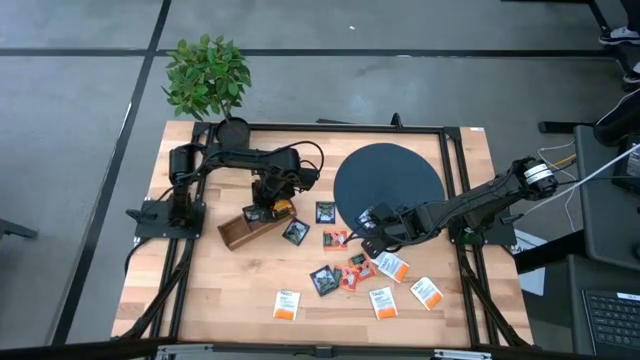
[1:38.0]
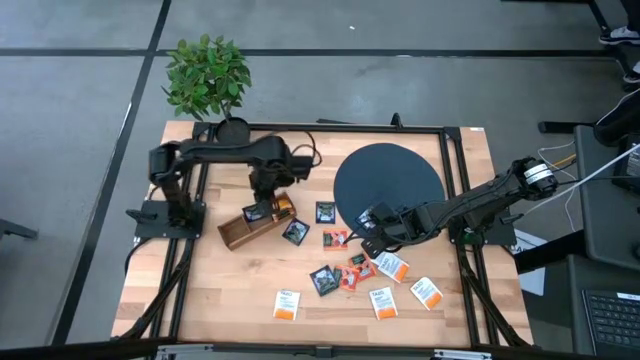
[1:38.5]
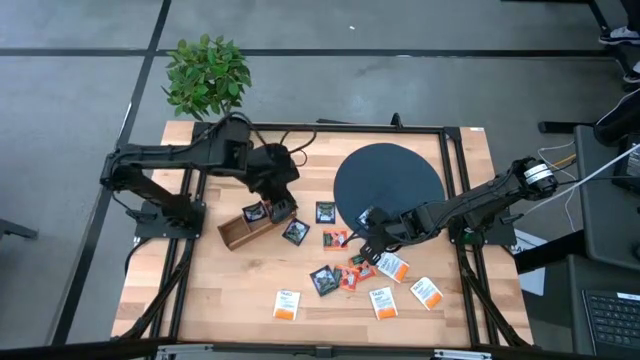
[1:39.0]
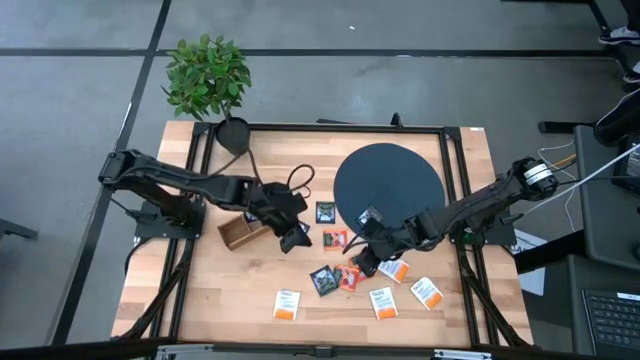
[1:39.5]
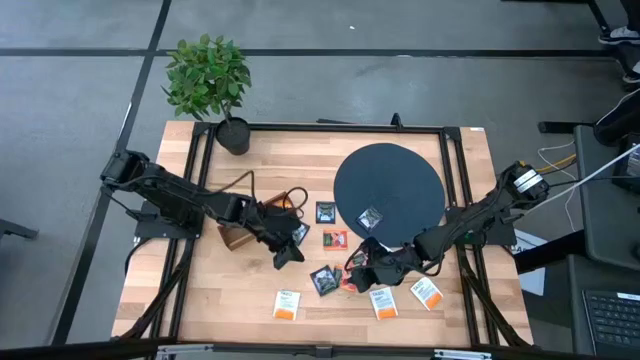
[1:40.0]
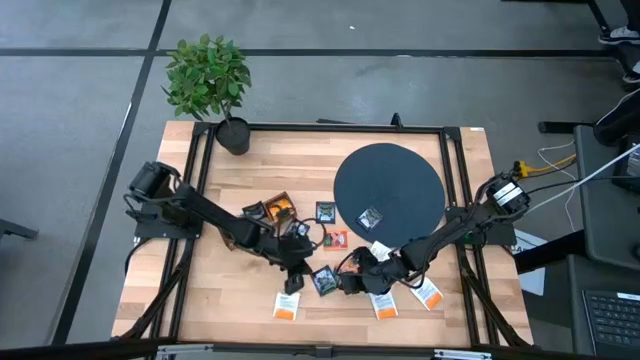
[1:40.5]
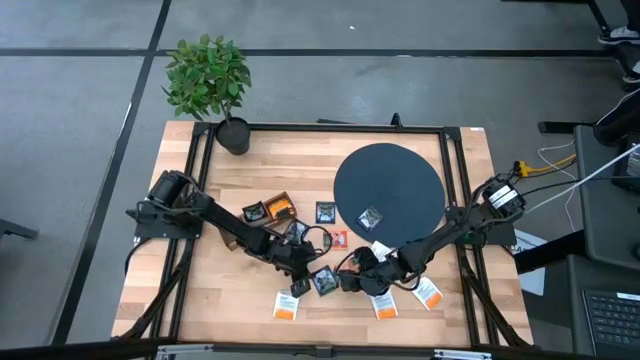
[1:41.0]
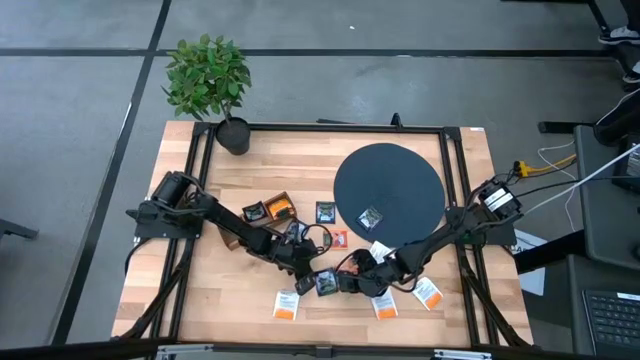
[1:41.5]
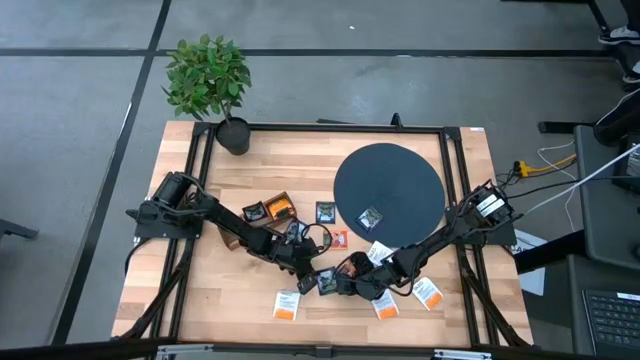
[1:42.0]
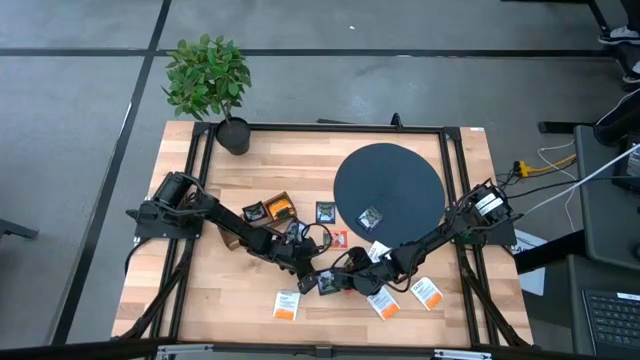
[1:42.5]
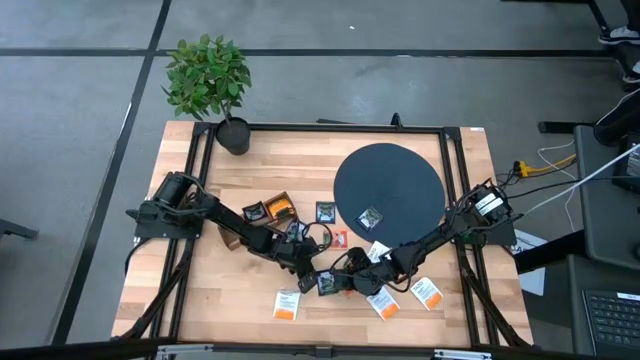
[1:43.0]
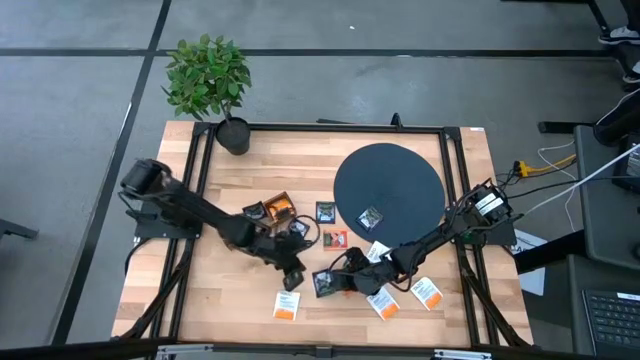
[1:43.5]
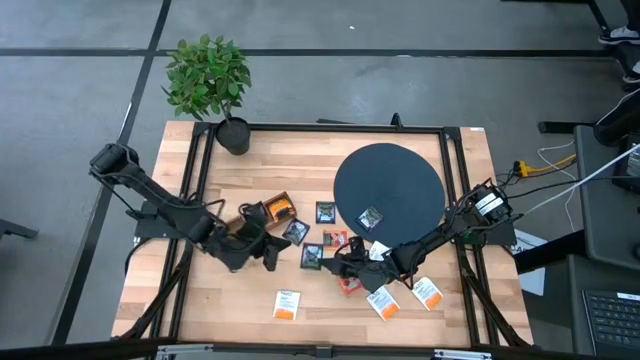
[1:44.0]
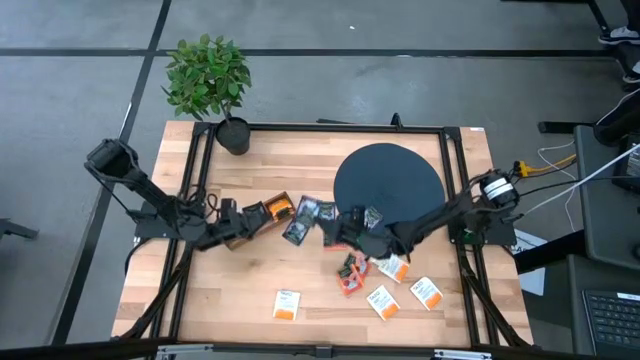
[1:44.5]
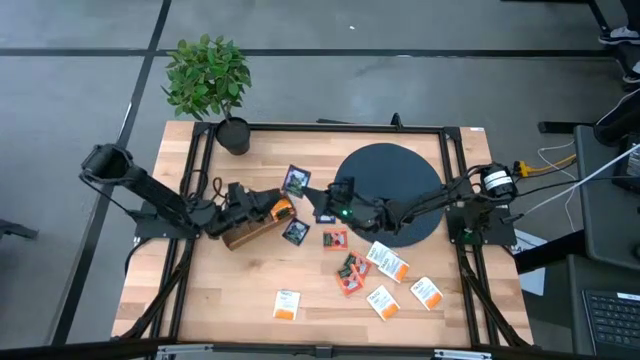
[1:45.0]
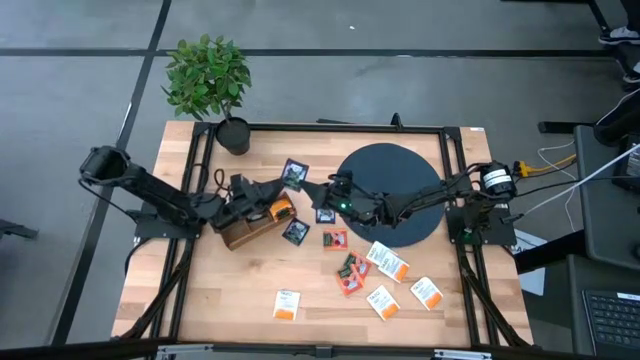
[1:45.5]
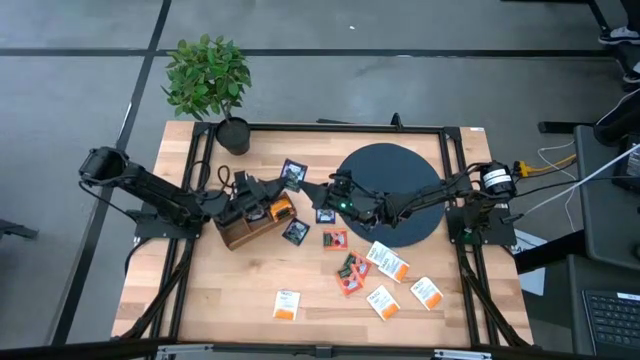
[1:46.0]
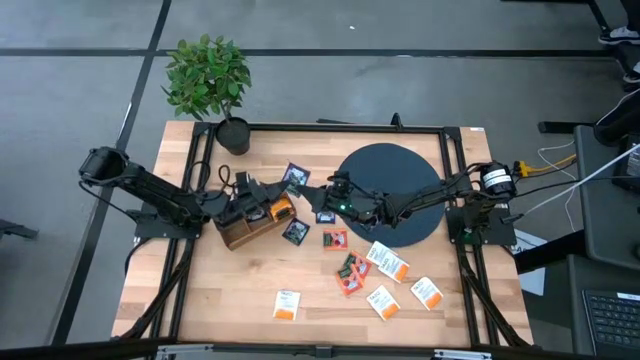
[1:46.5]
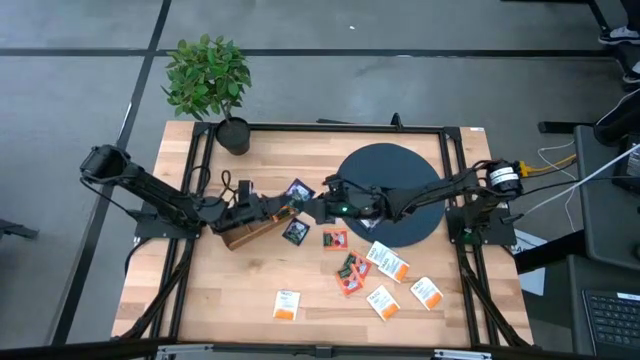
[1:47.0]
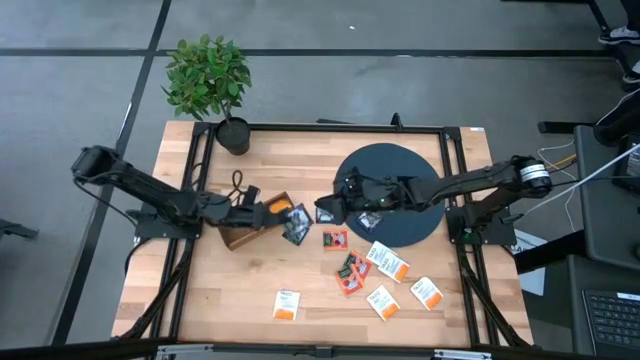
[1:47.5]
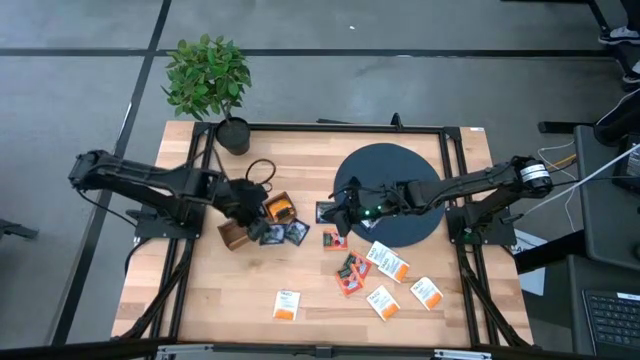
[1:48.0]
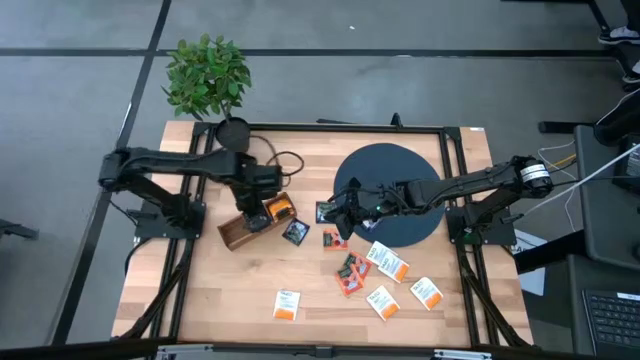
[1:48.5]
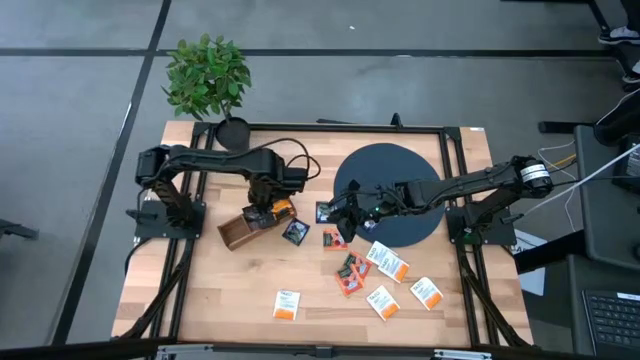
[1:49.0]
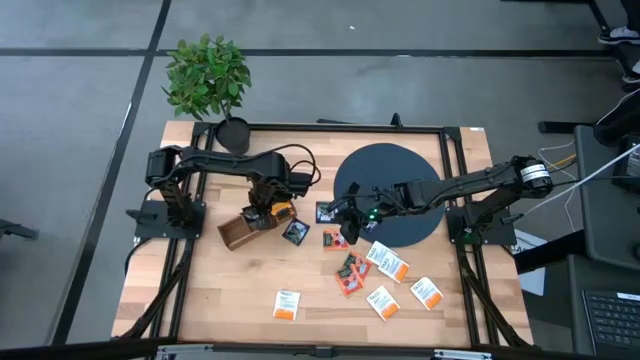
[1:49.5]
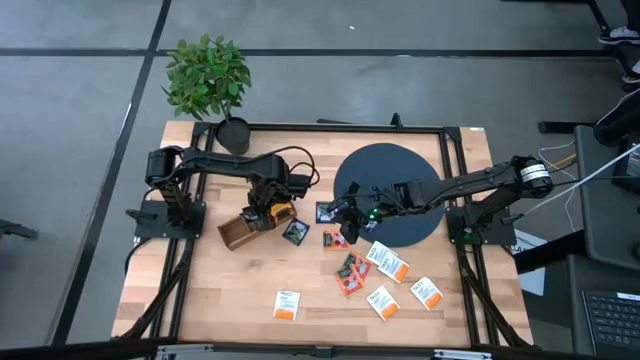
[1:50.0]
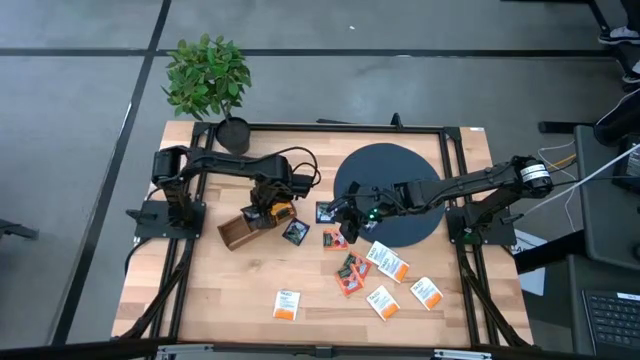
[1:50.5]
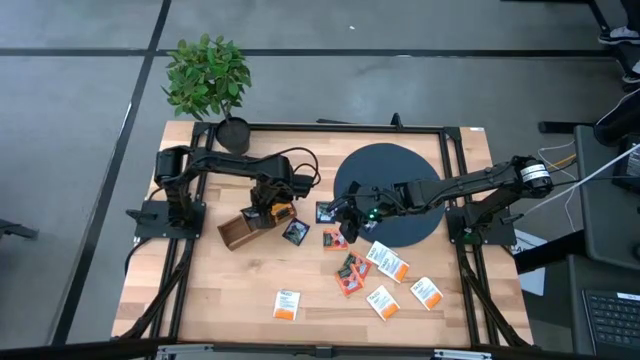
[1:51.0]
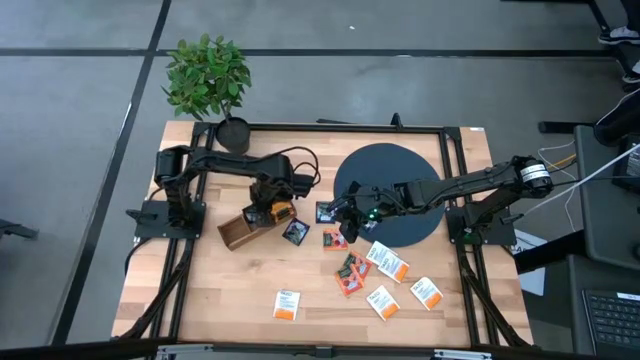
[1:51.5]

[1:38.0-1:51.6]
Task: Pick & Place Tea
Put the black tea bag into the middle section of the wooden organizer

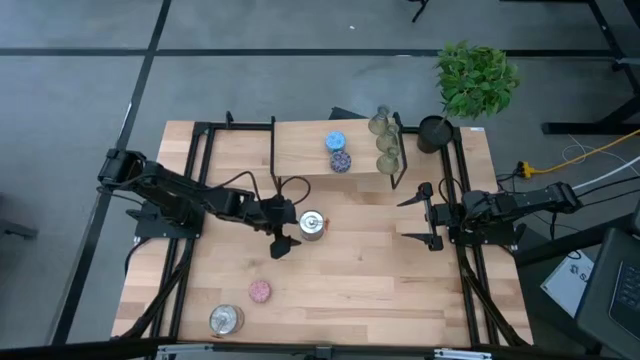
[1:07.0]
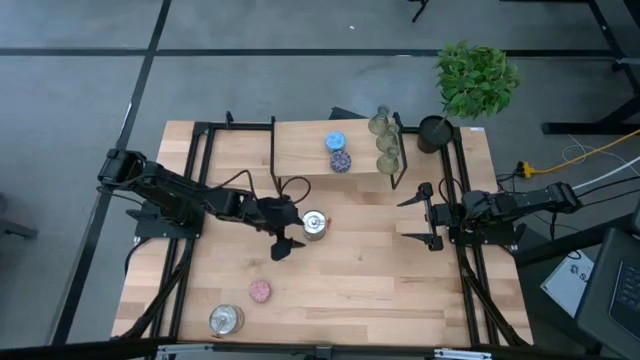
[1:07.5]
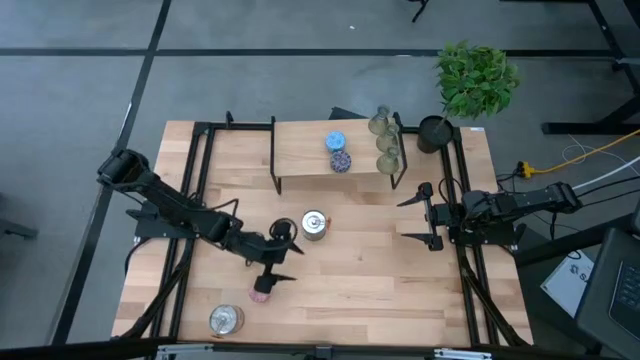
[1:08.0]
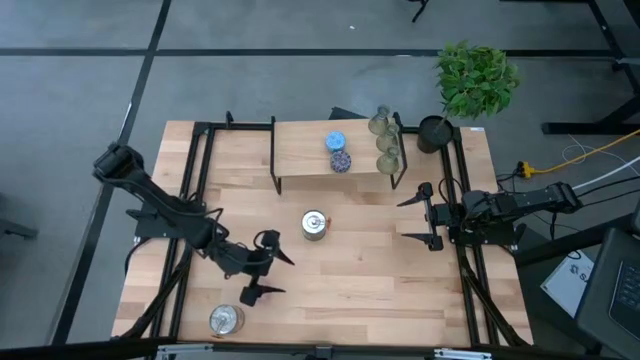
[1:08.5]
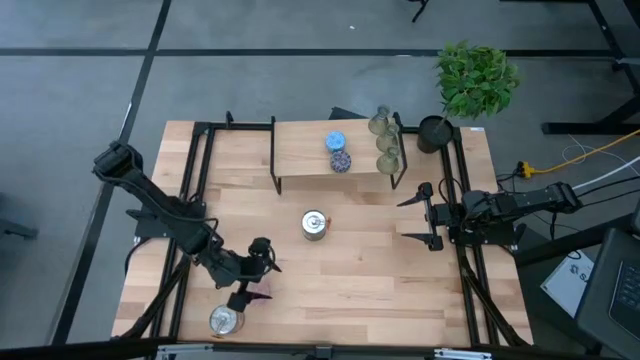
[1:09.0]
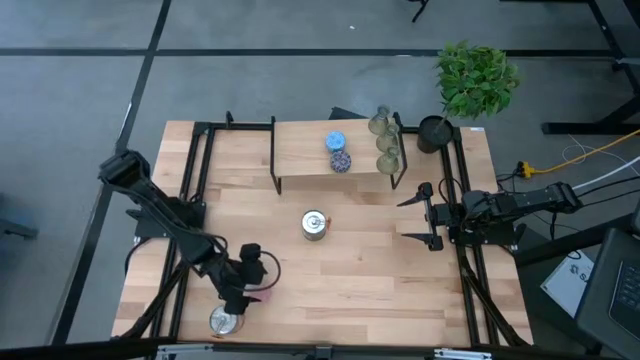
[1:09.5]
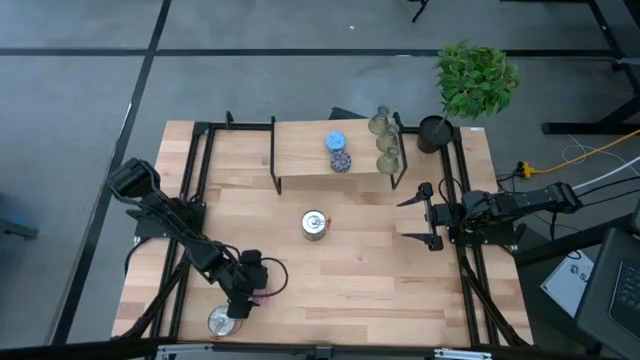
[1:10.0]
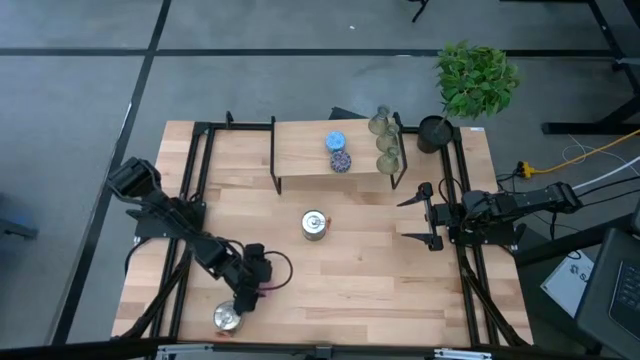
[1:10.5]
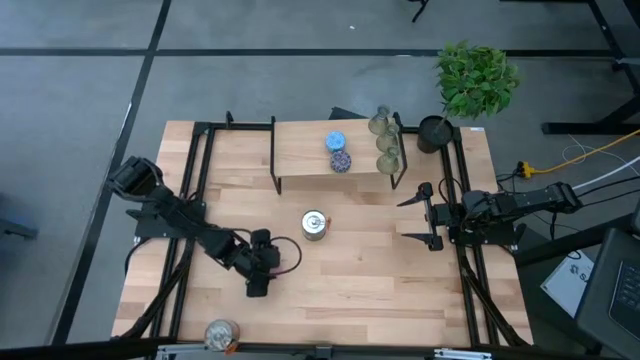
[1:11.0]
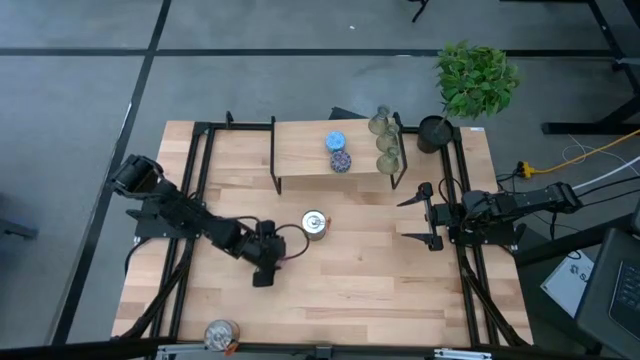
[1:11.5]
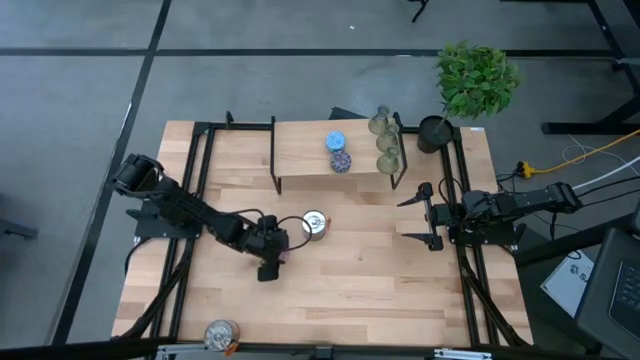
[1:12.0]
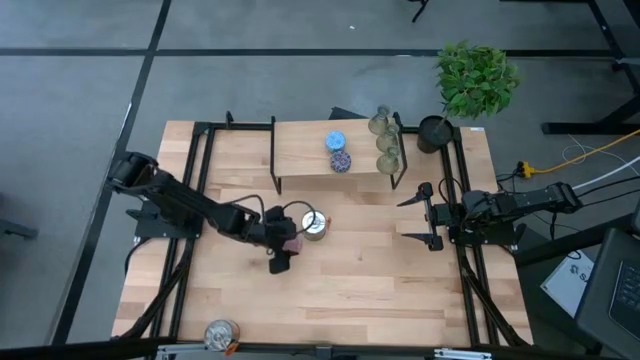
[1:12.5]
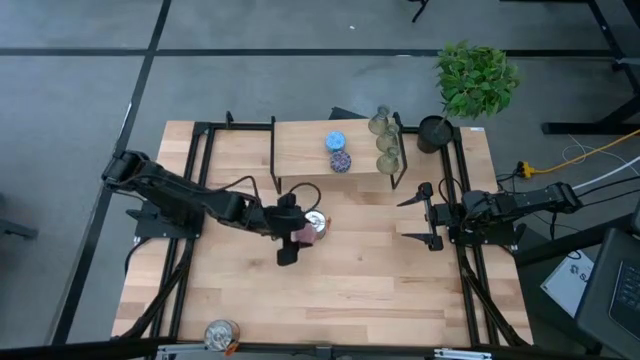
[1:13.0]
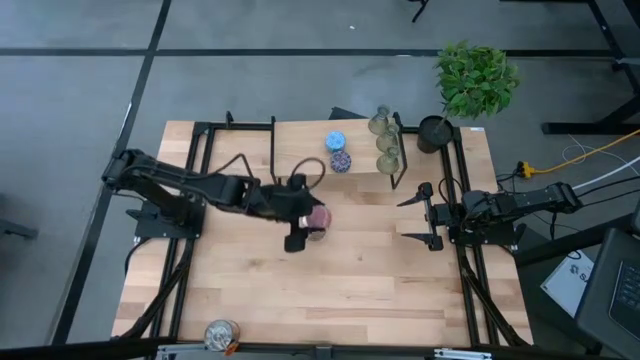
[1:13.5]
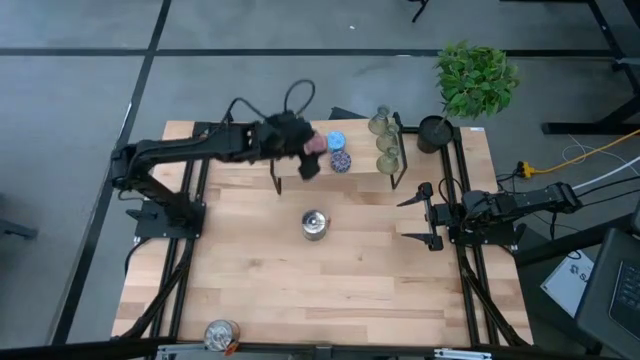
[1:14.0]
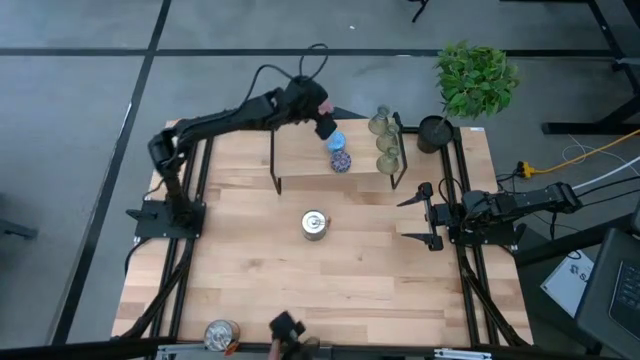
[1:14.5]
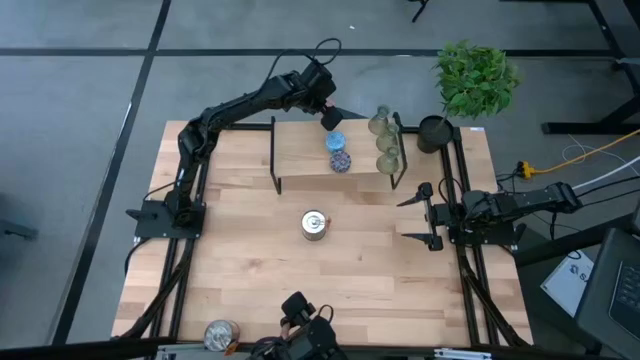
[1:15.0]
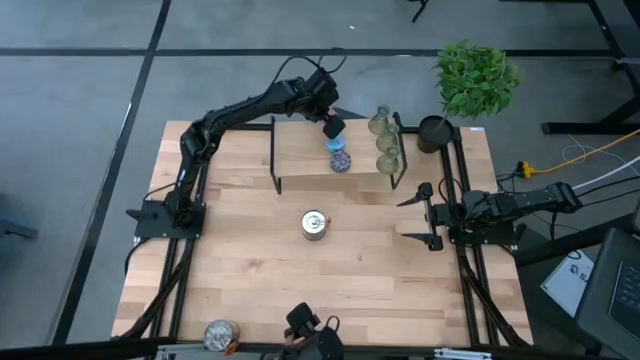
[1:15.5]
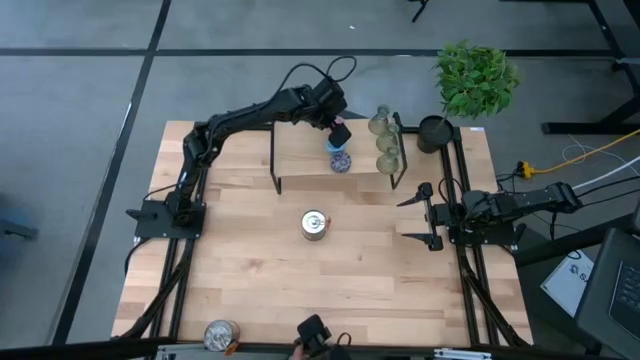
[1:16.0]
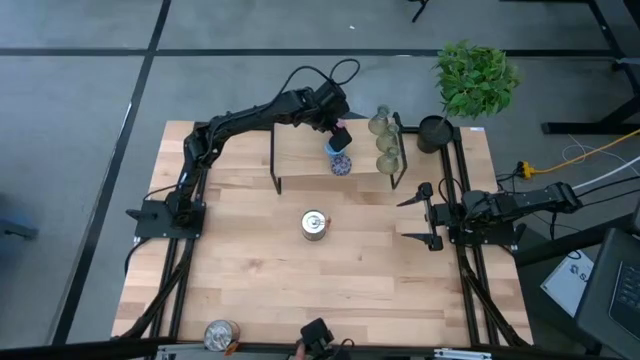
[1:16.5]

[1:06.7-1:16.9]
Task: Pick & Place candle stick holders
Put the patterned pink scented candle on the shelf aligned with the patterned blue scented candle
